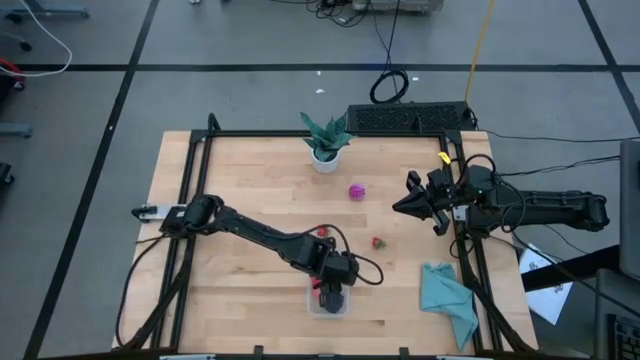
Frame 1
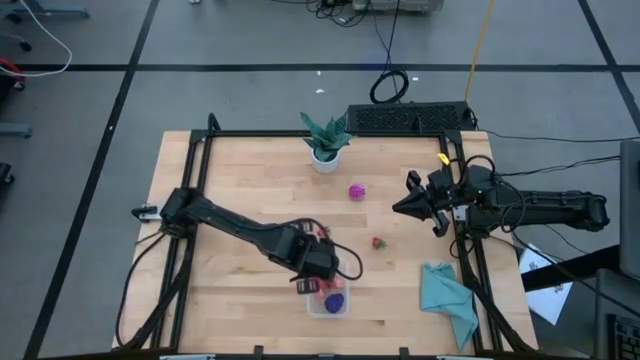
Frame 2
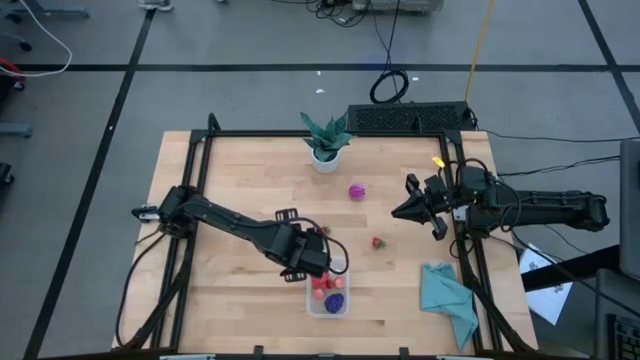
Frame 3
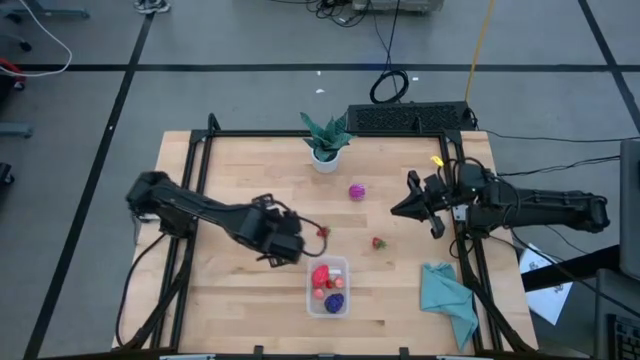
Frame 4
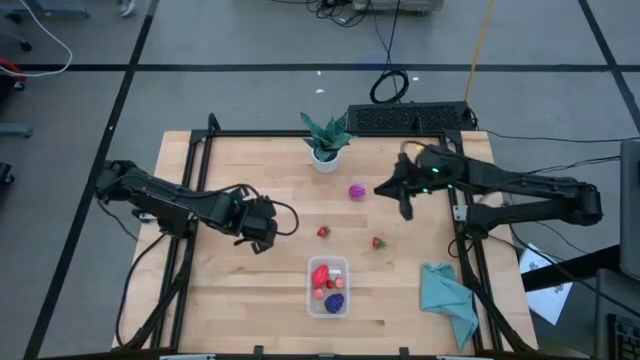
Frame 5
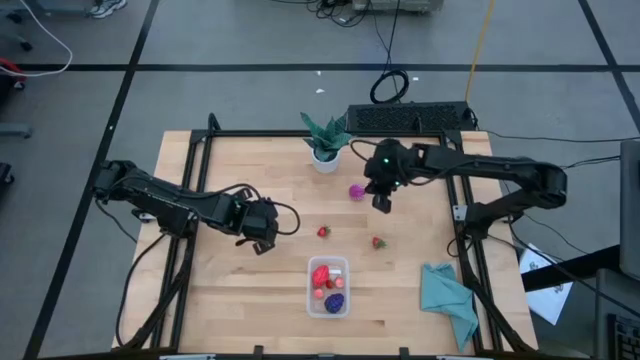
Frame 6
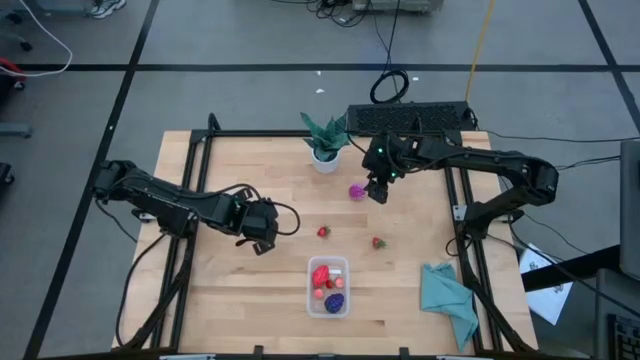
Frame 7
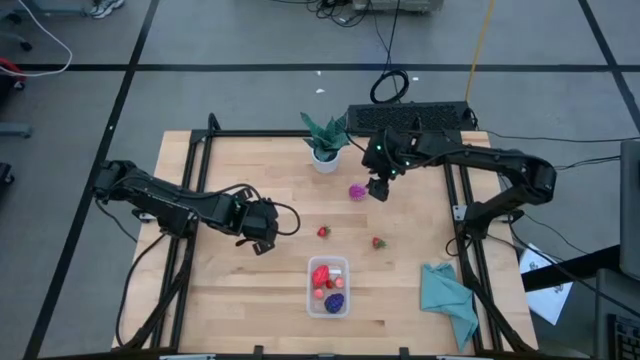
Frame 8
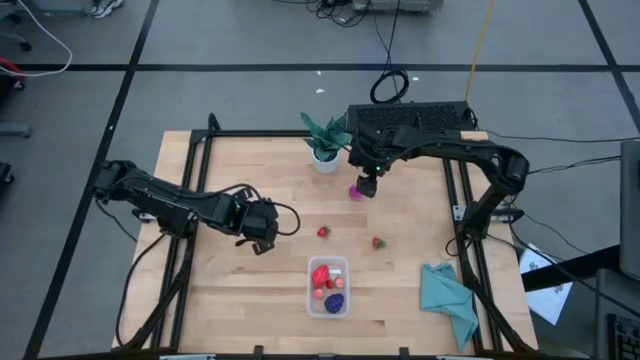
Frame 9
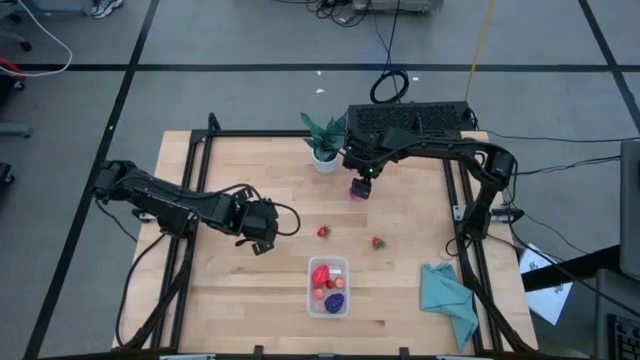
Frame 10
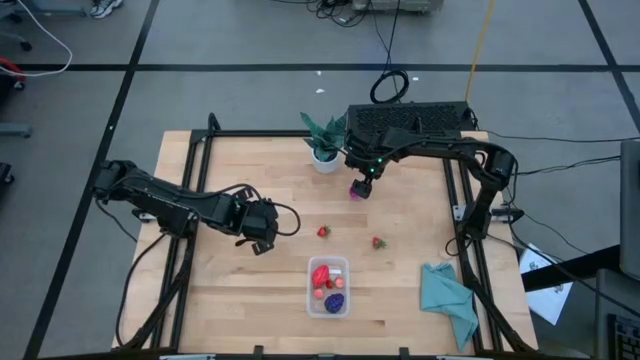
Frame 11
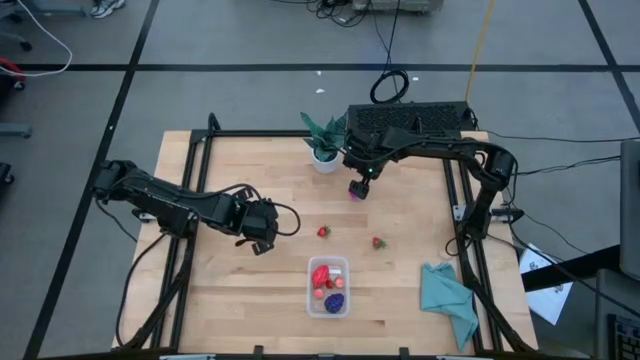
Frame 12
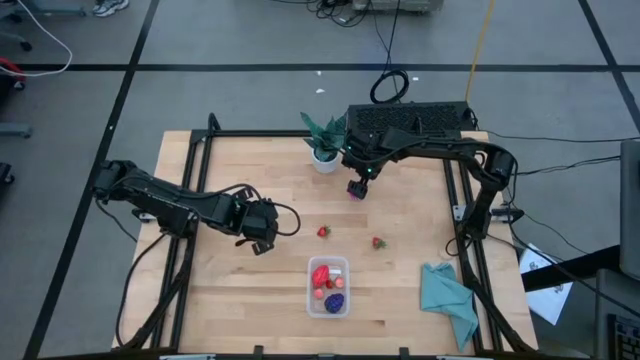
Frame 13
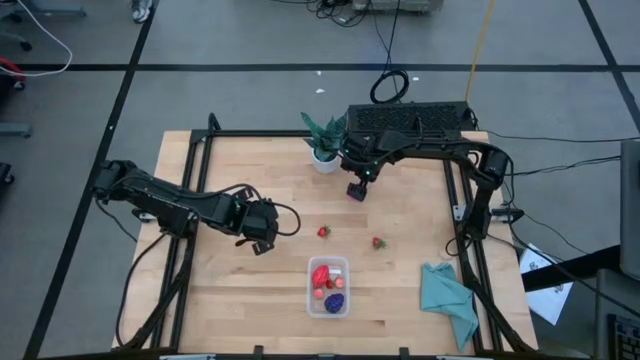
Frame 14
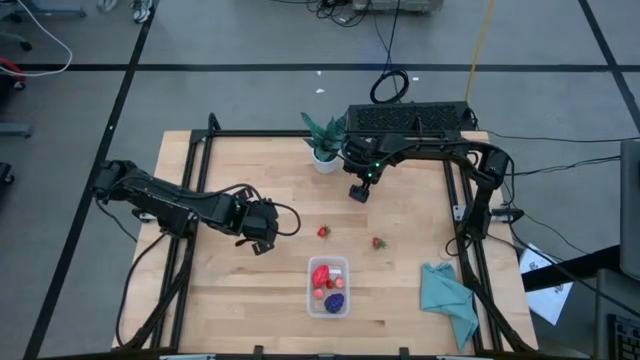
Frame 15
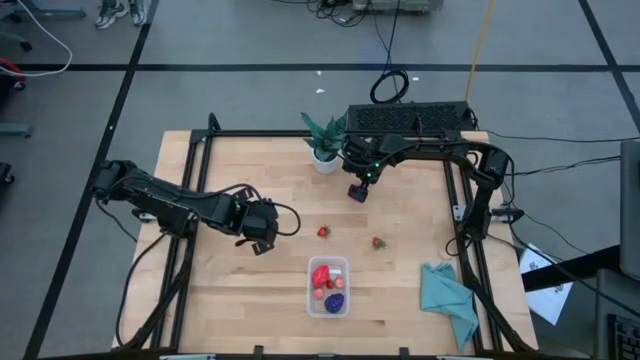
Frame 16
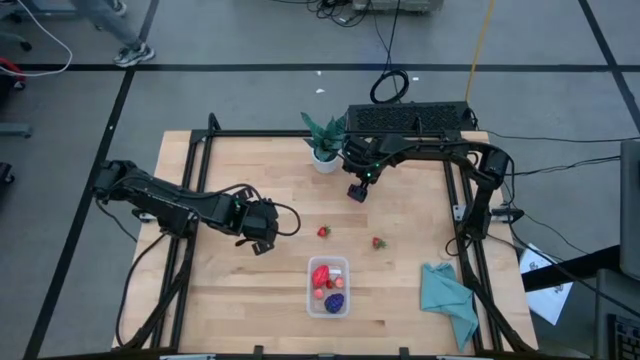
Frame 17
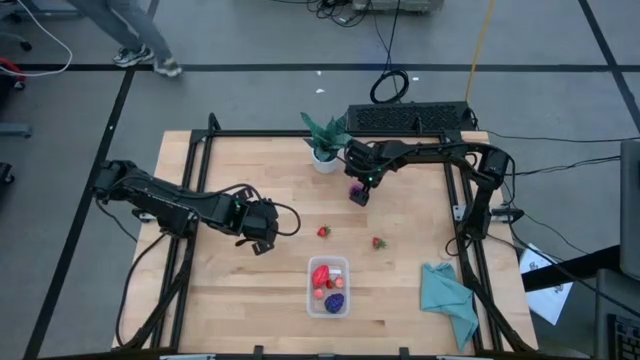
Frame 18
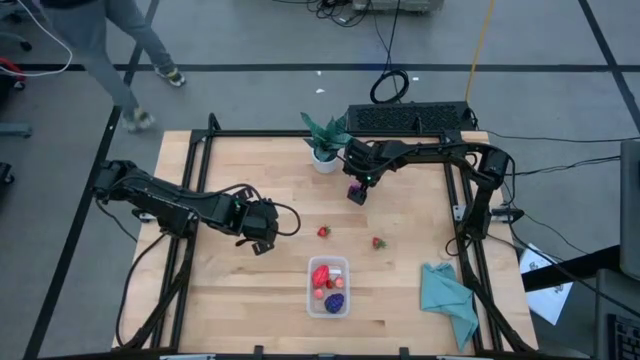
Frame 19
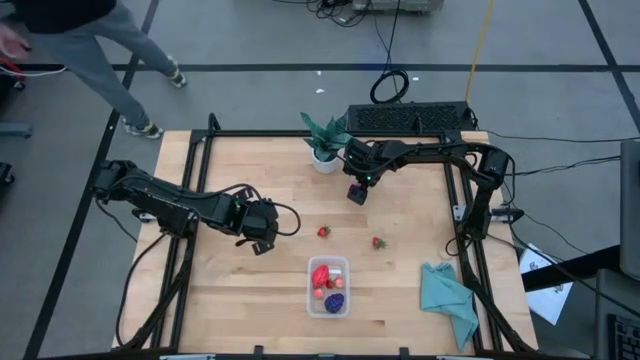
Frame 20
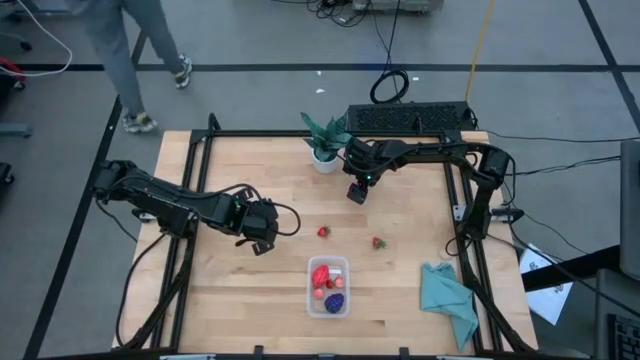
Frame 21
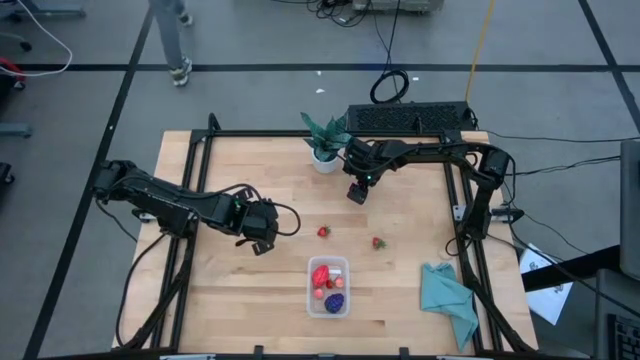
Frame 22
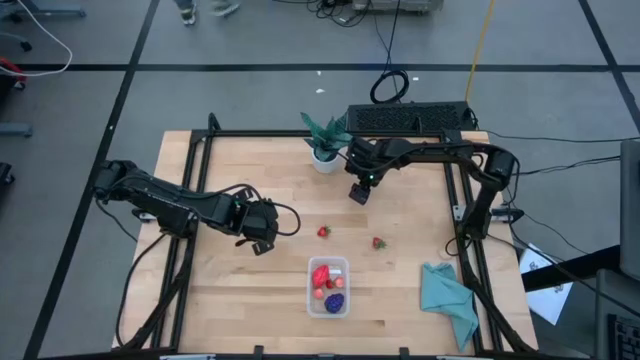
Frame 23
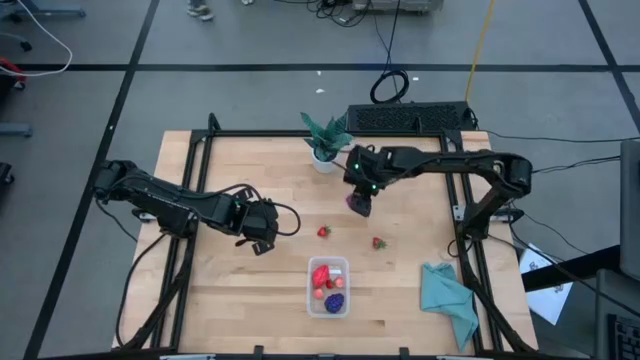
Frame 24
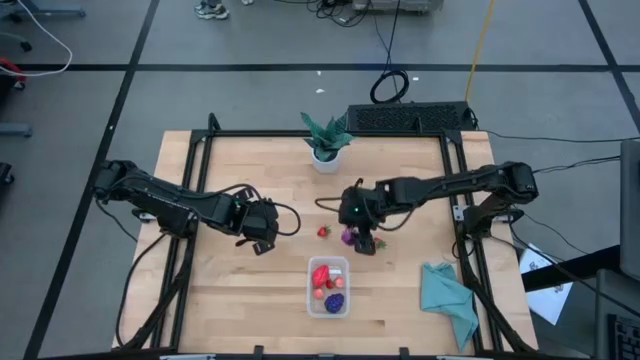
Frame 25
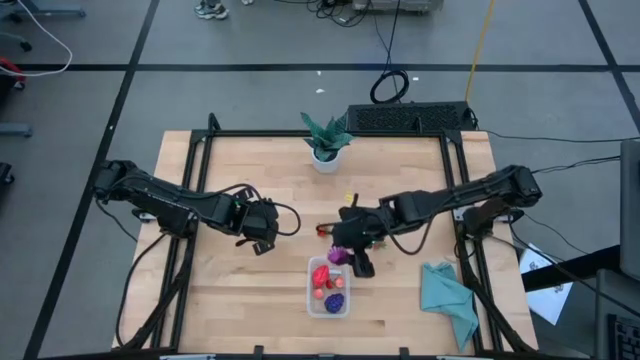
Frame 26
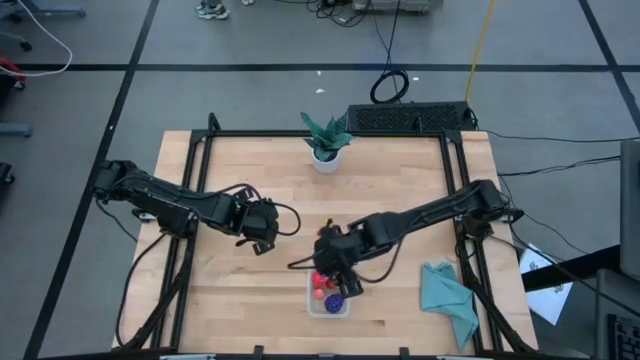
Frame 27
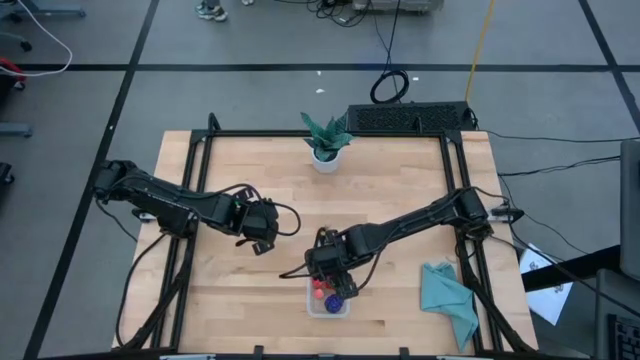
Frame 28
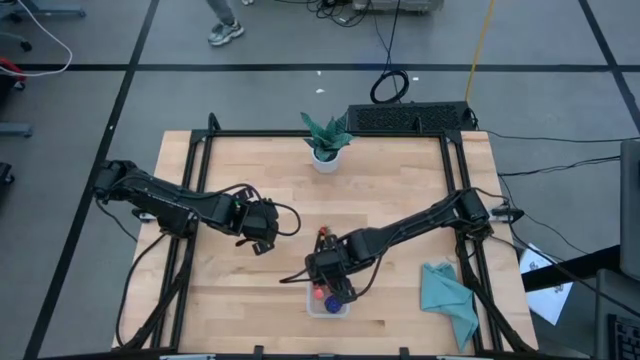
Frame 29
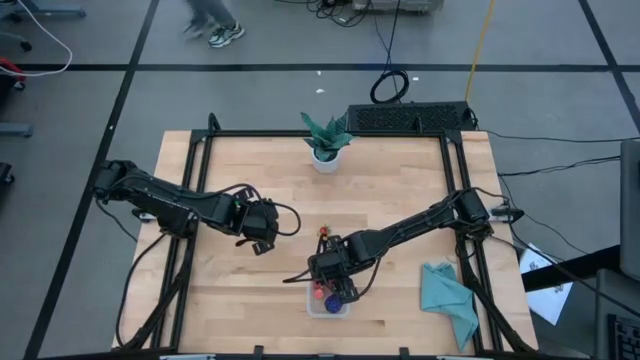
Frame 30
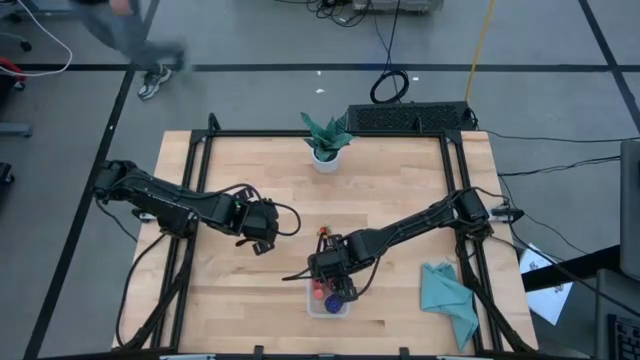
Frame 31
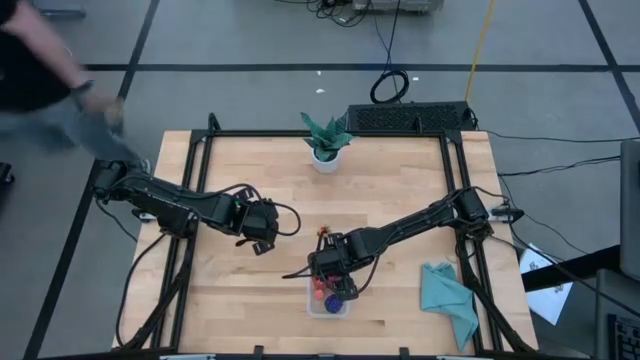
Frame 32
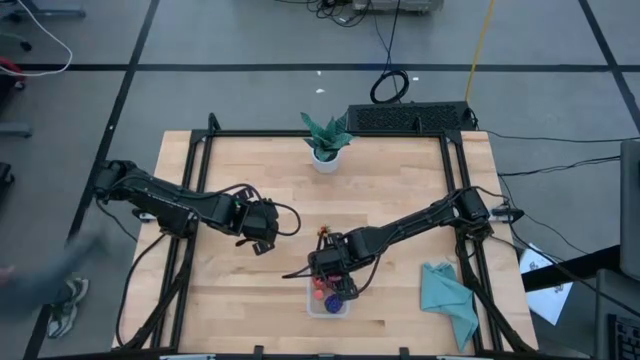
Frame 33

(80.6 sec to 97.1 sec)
Task: Pick and placing Produce into tupperware
Put the violet onion into the transparent container

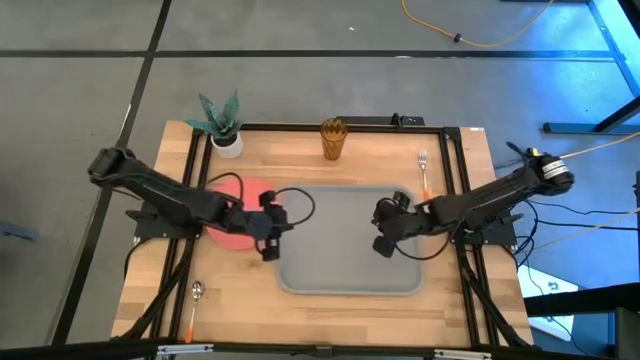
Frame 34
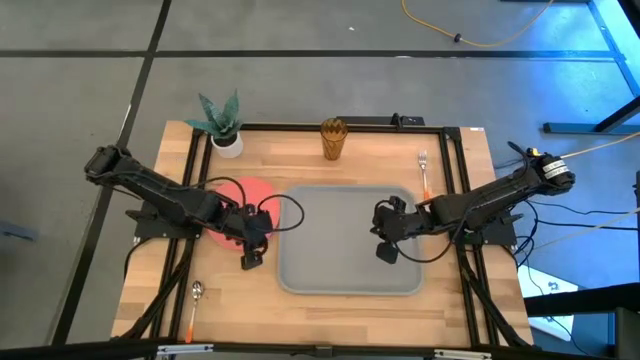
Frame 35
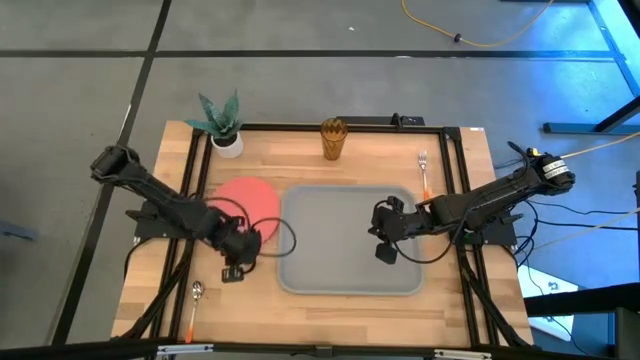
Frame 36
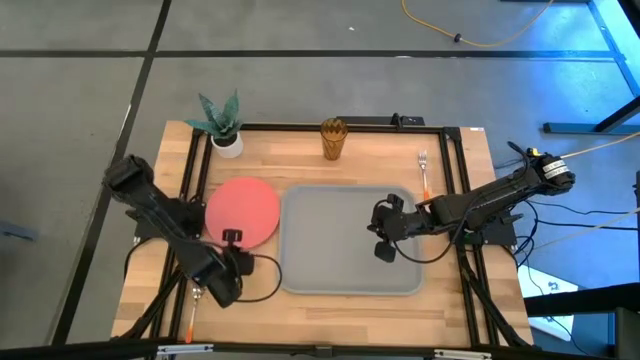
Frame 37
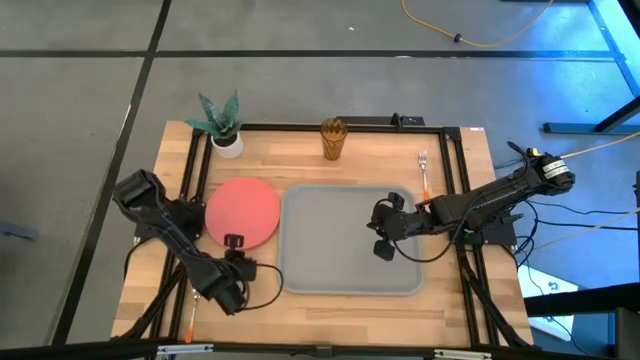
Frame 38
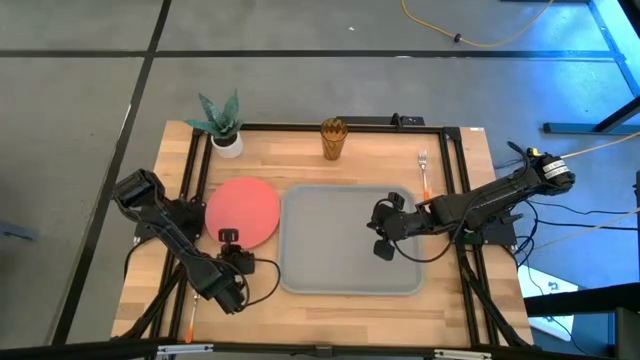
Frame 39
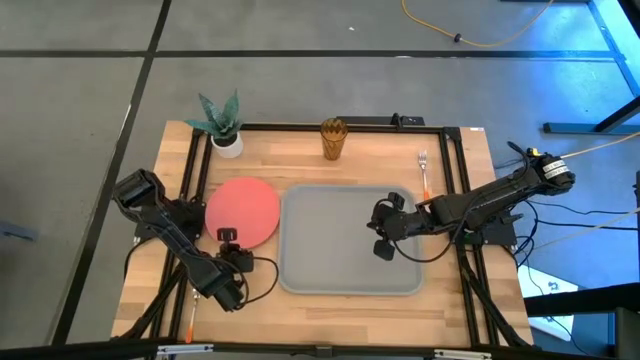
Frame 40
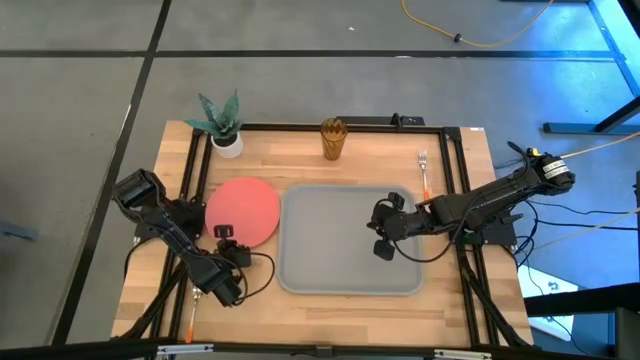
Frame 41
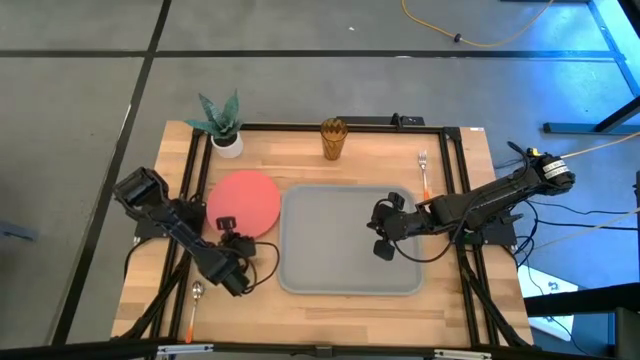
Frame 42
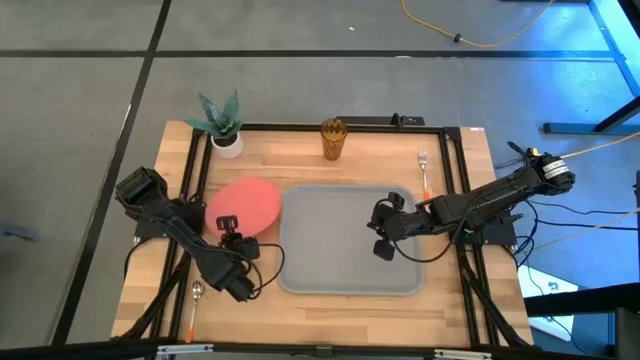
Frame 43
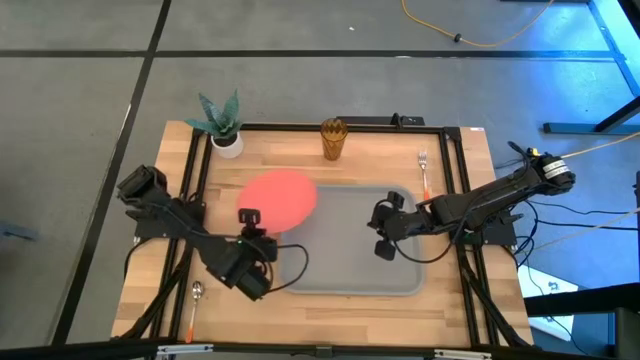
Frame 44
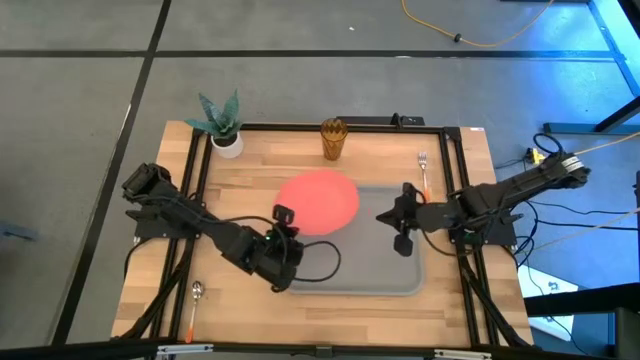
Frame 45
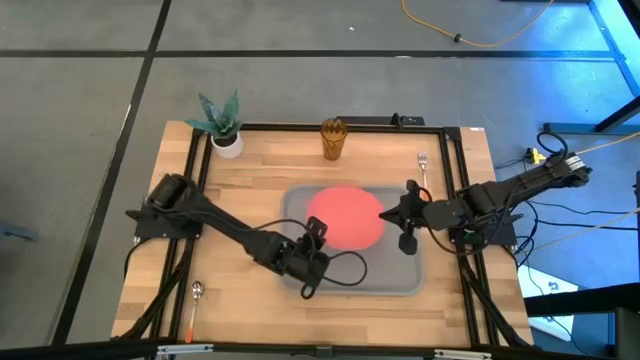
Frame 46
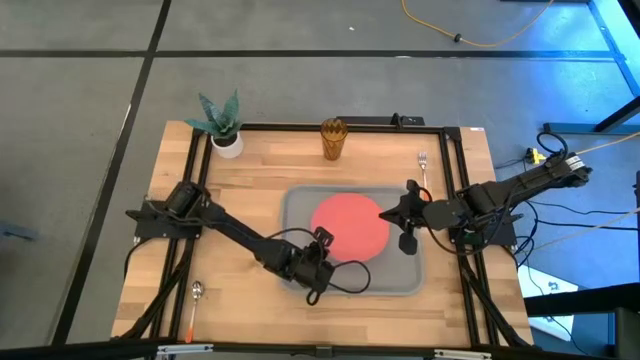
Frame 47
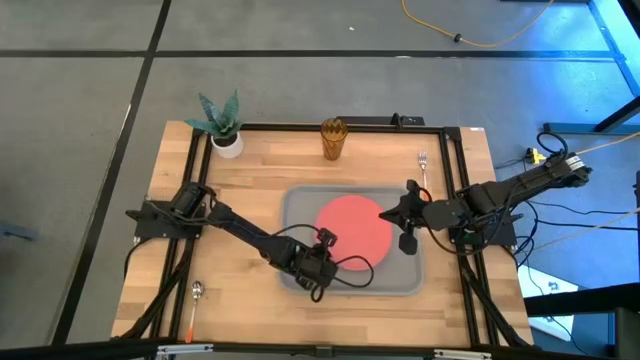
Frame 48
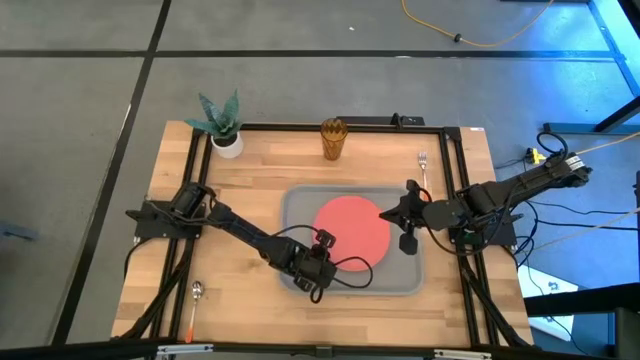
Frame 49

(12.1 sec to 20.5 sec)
Task: Pick and place plate/cup/fork/spoon on tray
Put the plate in the center of the serving tray
